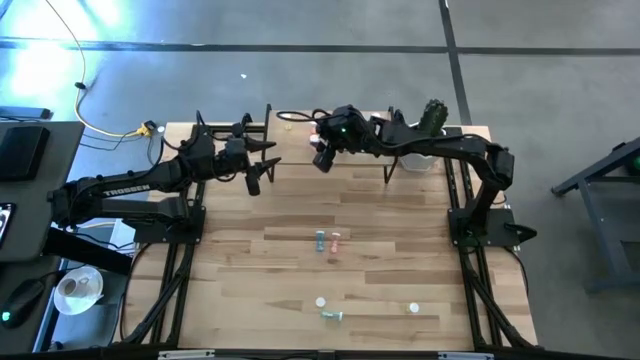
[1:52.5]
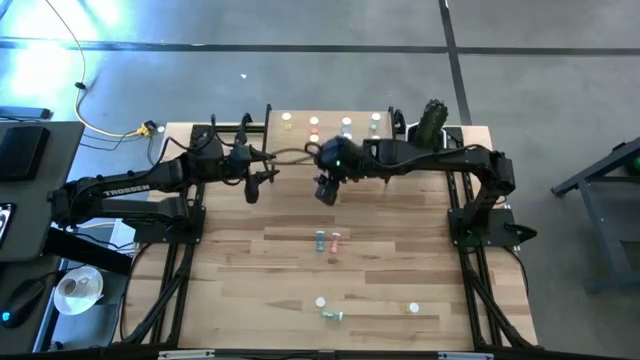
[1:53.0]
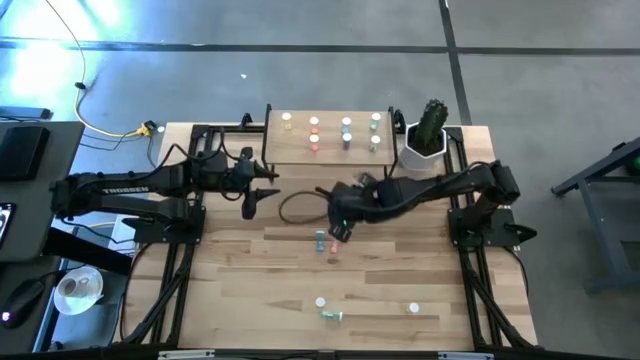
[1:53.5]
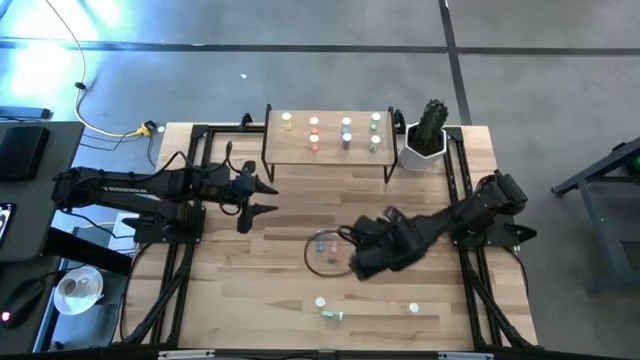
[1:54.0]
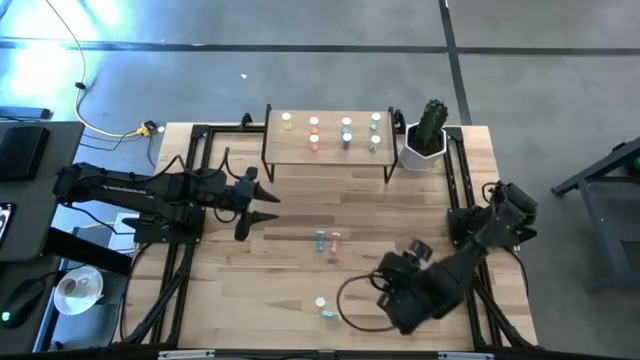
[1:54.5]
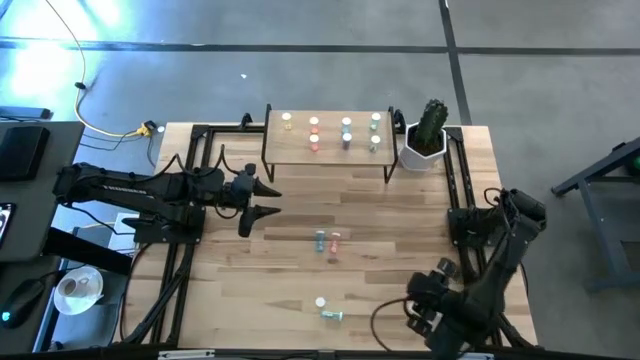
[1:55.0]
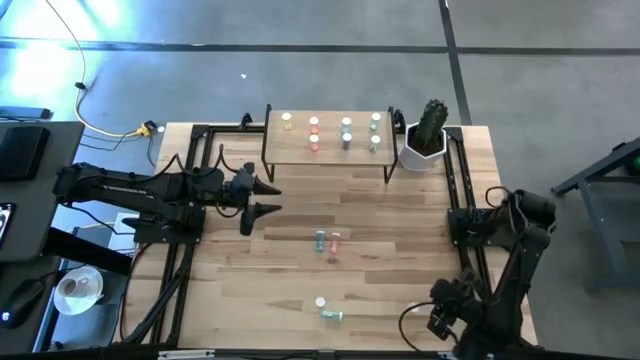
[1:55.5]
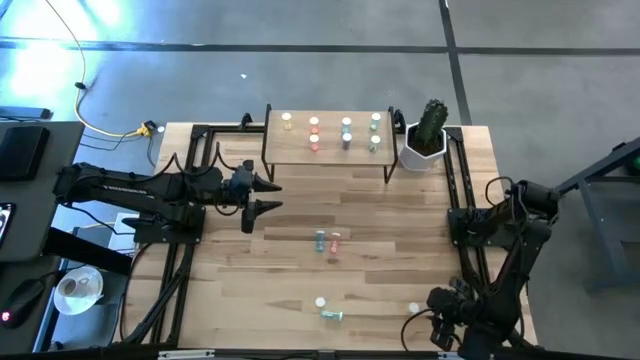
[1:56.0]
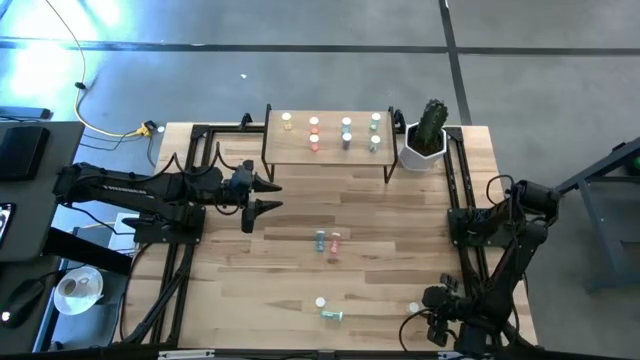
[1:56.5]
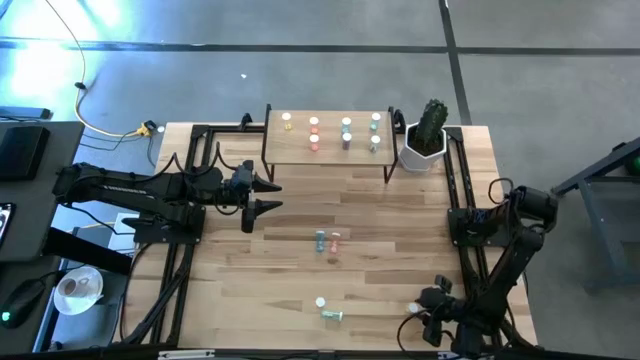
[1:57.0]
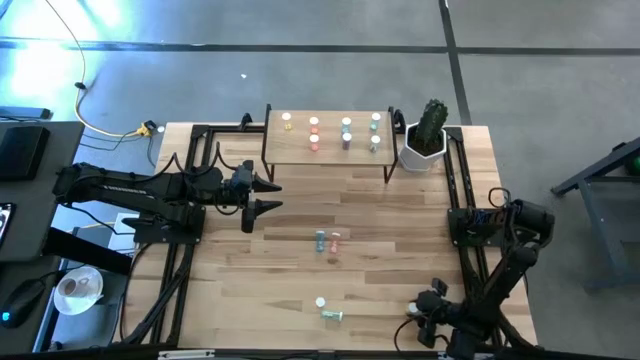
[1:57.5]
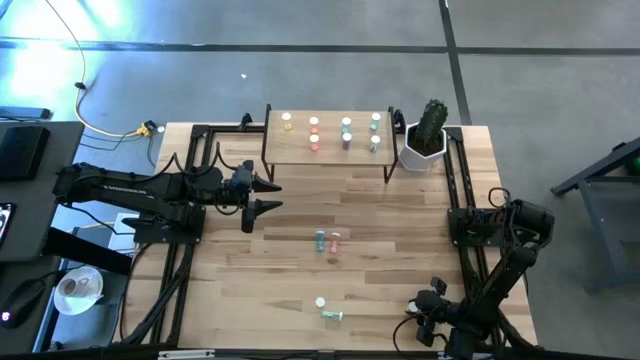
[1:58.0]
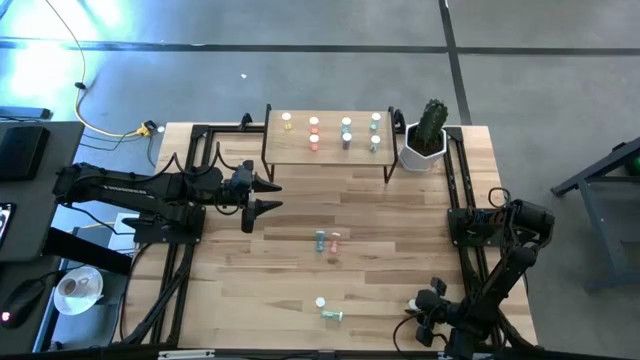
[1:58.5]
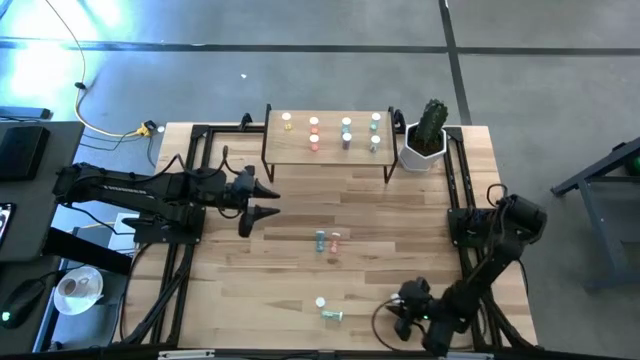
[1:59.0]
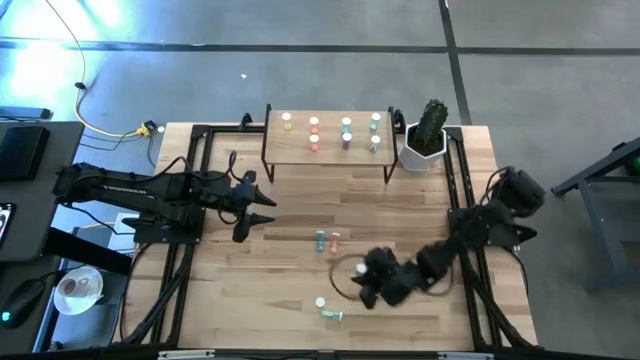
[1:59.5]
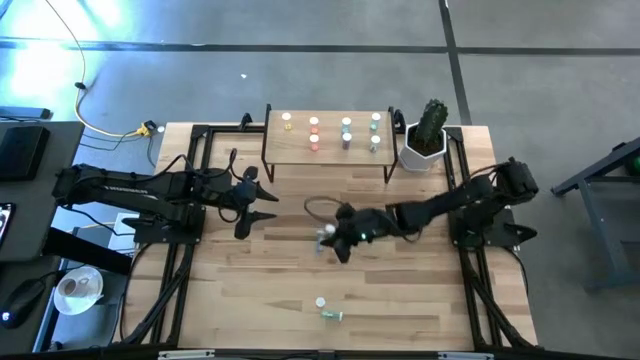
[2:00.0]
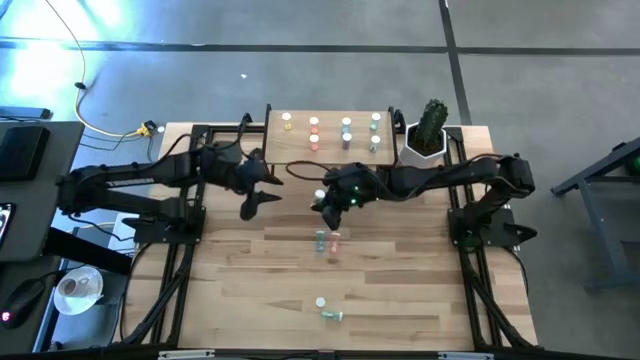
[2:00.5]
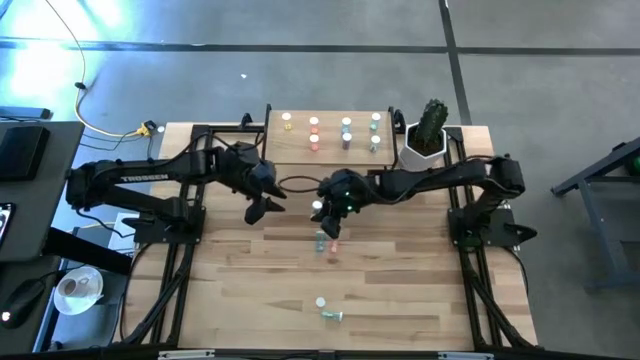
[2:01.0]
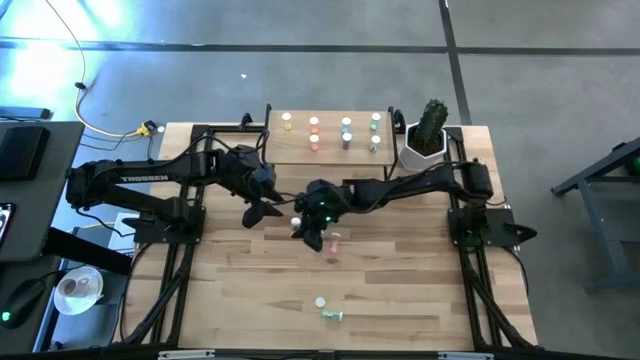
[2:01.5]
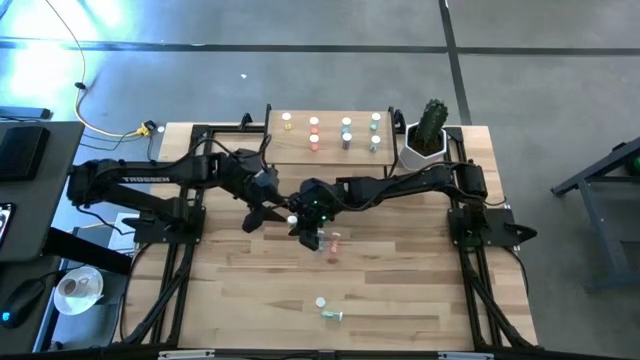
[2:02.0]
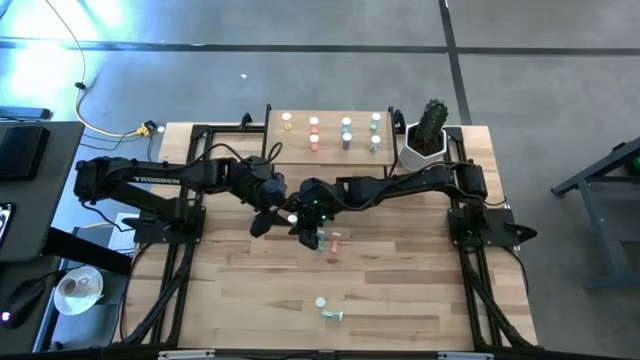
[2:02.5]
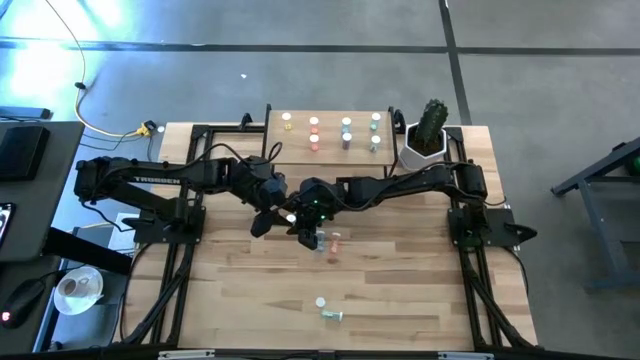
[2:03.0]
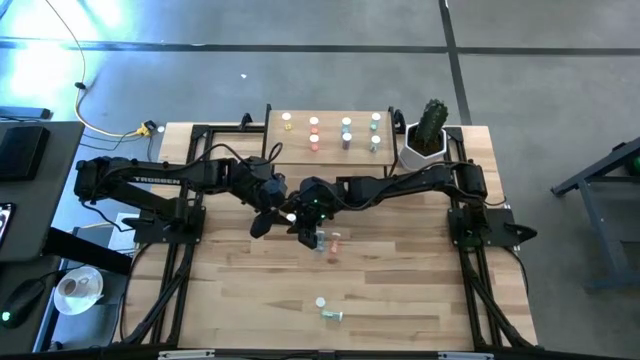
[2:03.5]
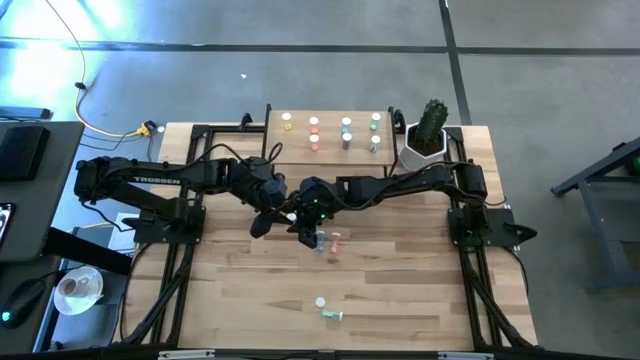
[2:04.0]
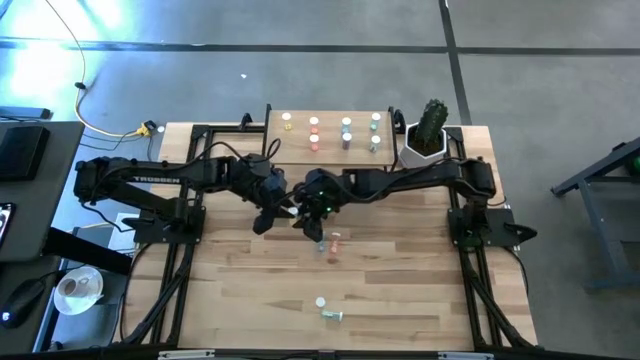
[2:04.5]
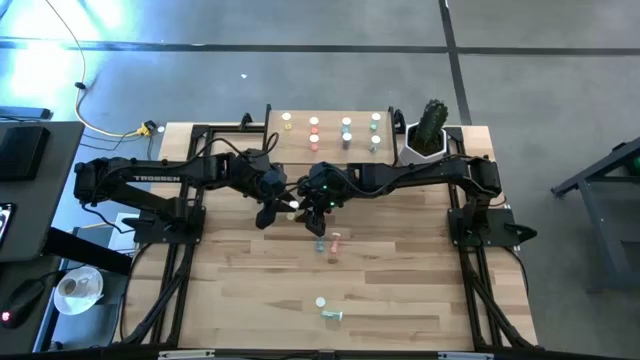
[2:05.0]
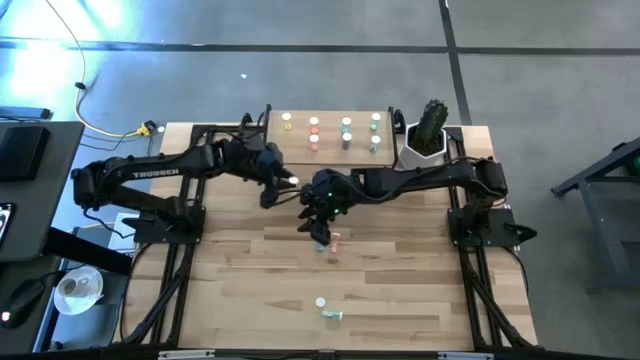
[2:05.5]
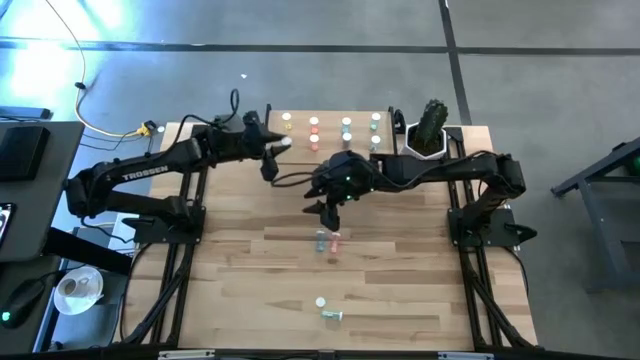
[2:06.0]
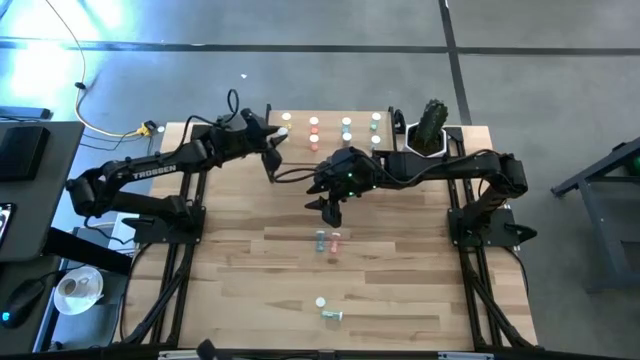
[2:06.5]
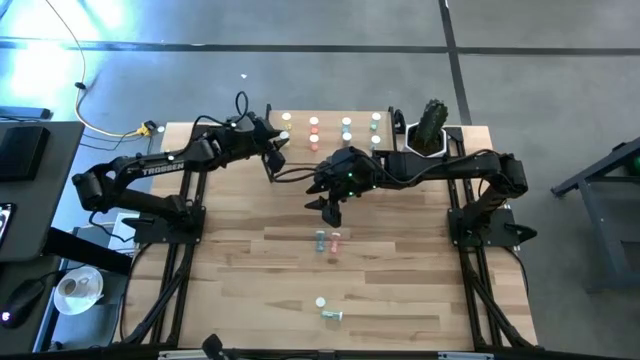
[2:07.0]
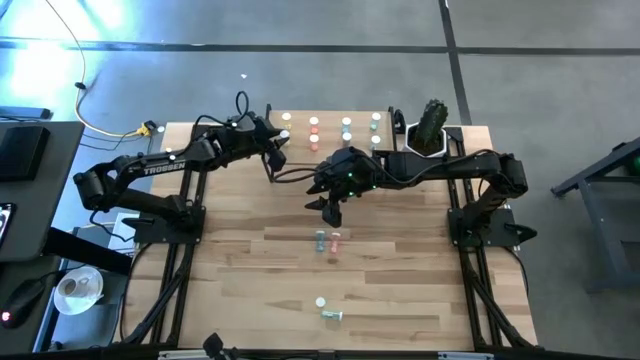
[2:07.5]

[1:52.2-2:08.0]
Task: Pick and place medicine bottles onto shelf by color
Put the right yellow pill bottle on the shelf aligned with the other yellow pill bottle

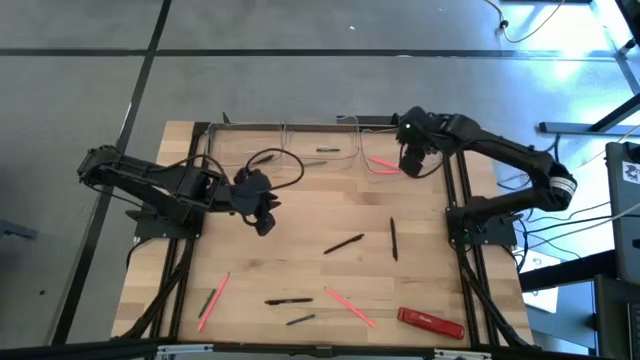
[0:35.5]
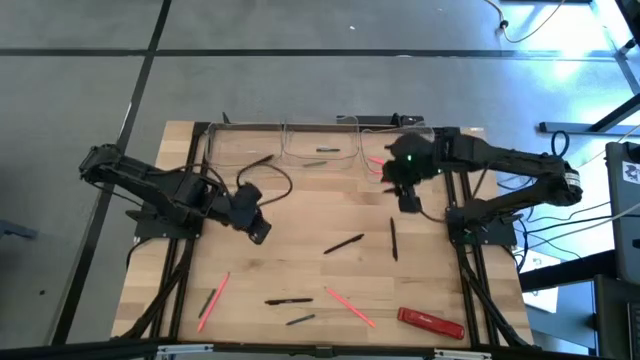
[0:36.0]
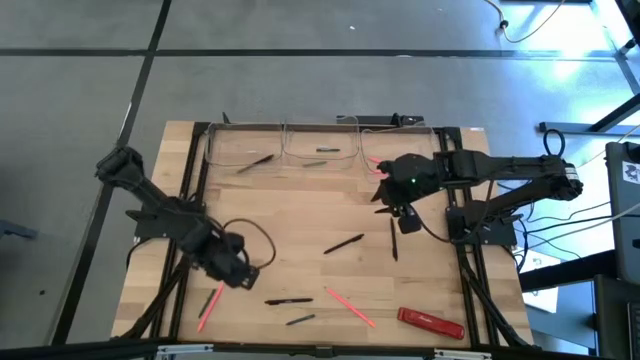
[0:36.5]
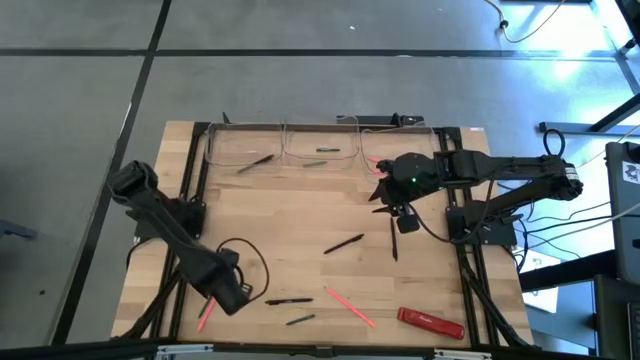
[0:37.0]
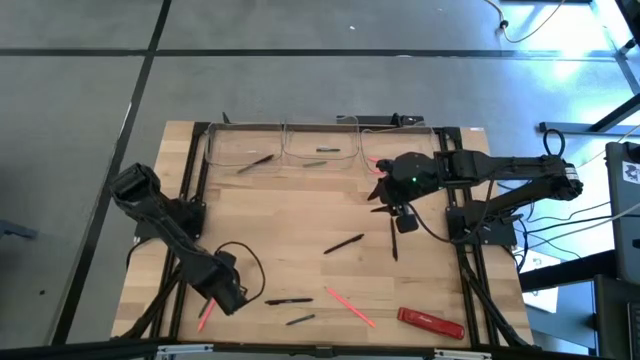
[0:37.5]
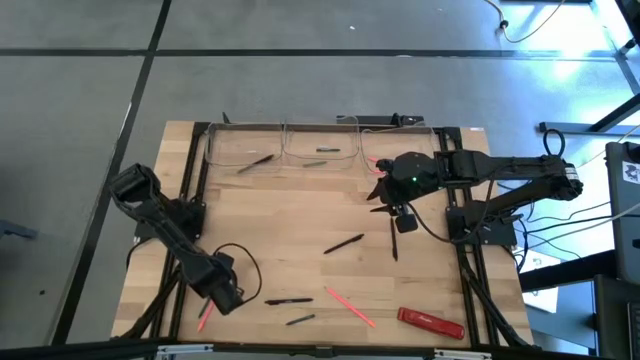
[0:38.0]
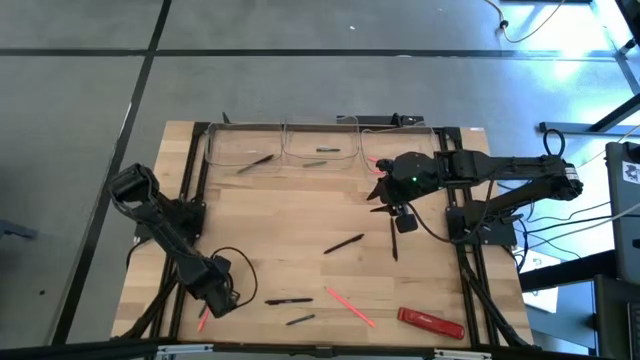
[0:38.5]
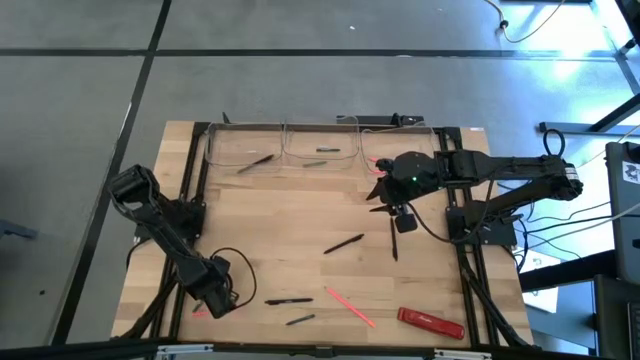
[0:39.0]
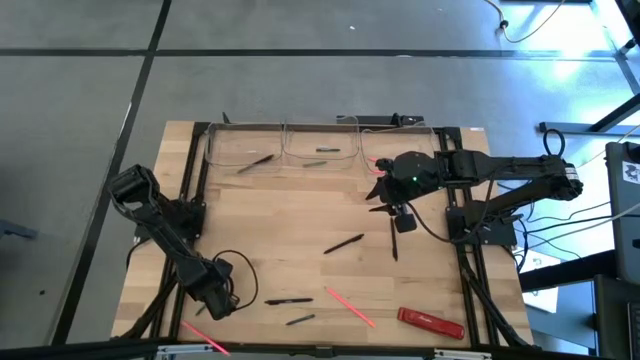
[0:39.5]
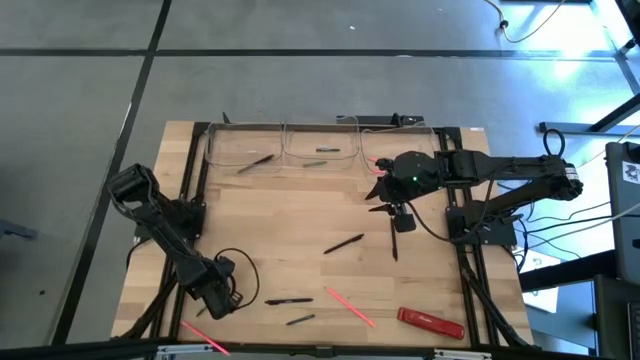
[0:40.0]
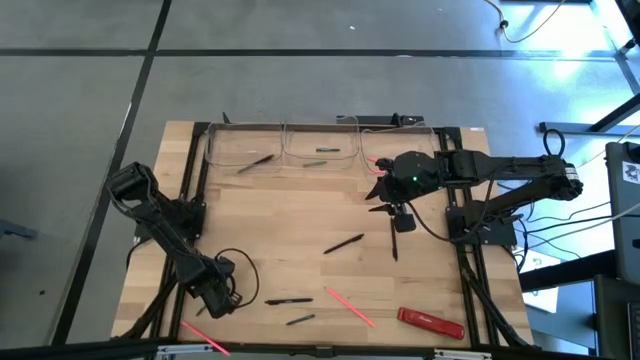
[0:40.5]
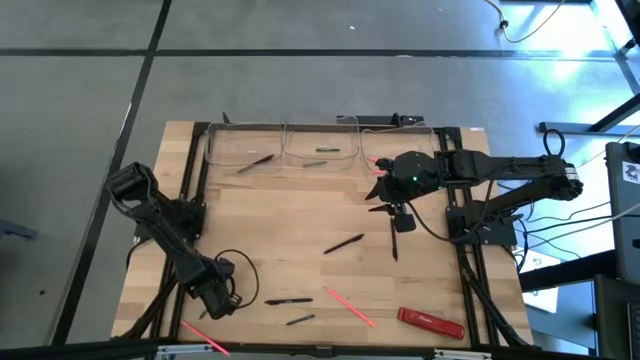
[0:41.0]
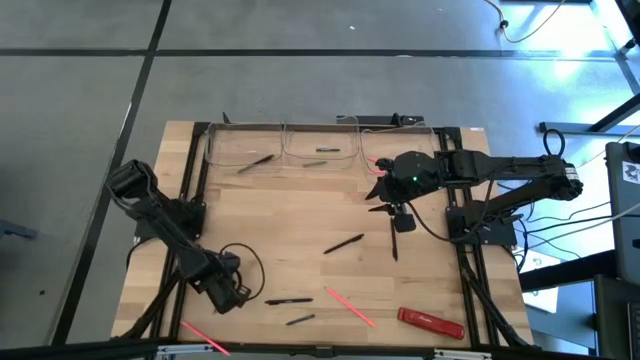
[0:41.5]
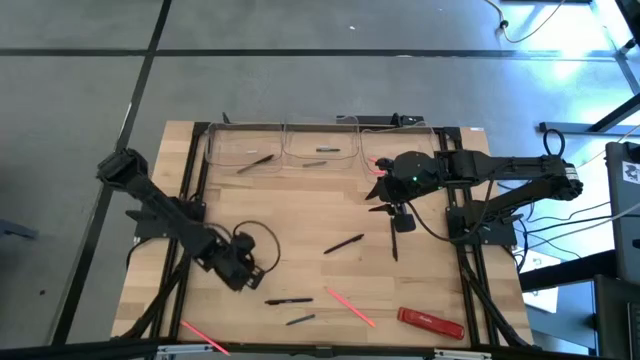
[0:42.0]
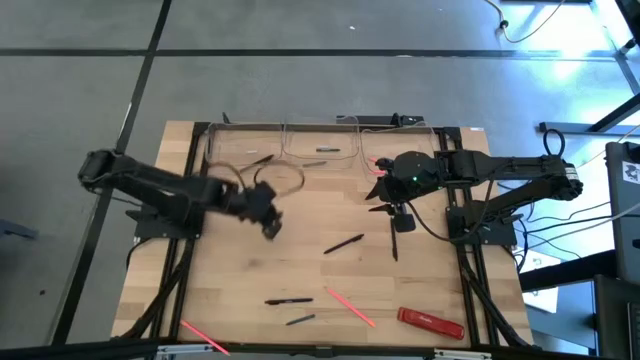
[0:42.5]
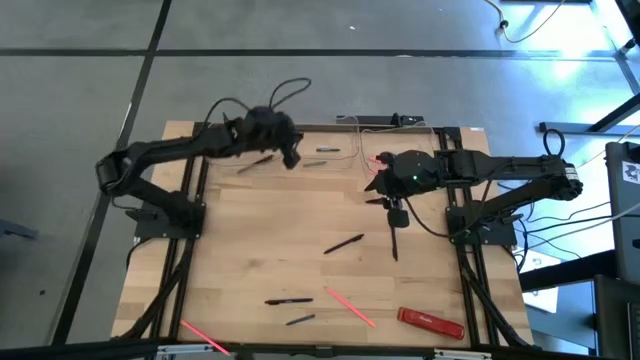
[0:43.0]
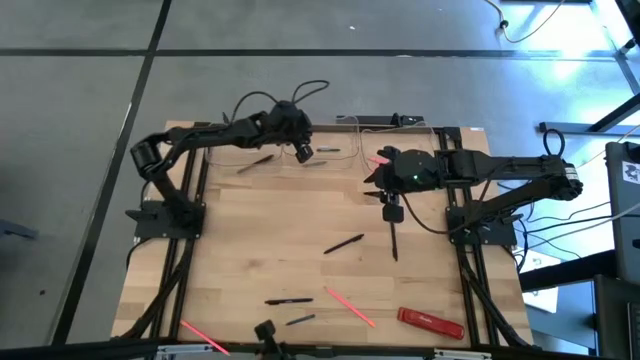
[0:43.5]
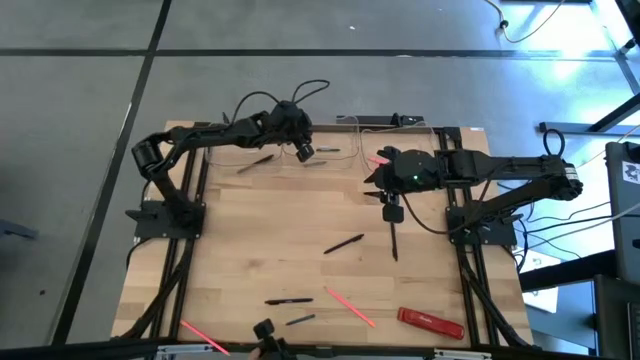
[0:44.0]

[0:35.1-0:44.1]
Task: Sort crayons/erasers/pens/pencils in bins
Put the green crayon into the middle transparent bin
